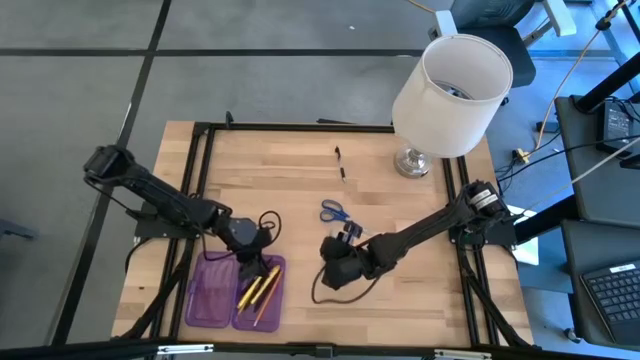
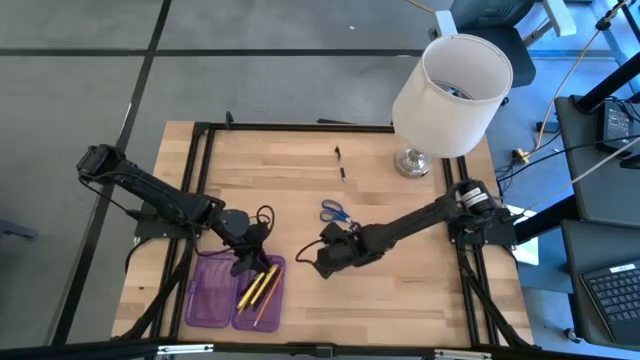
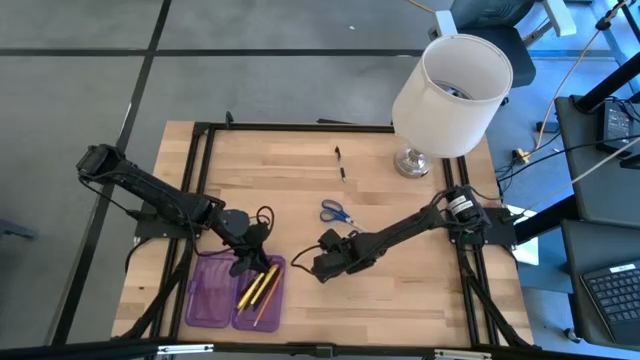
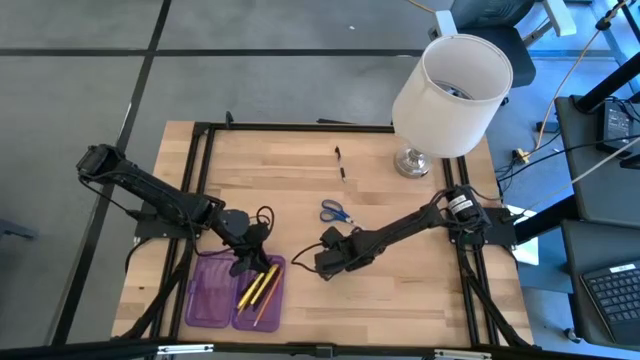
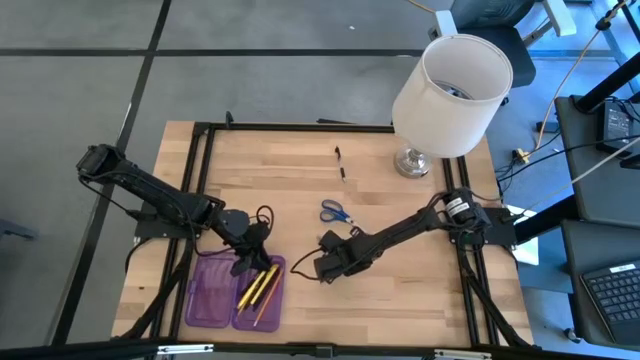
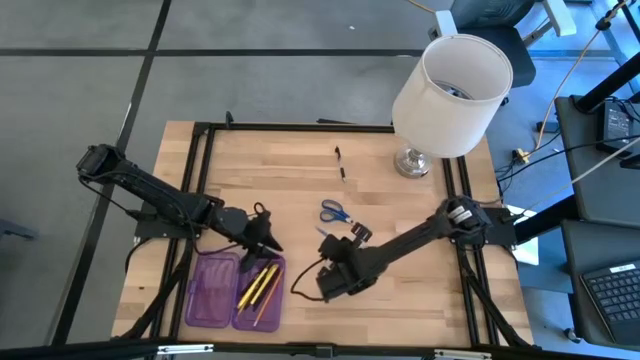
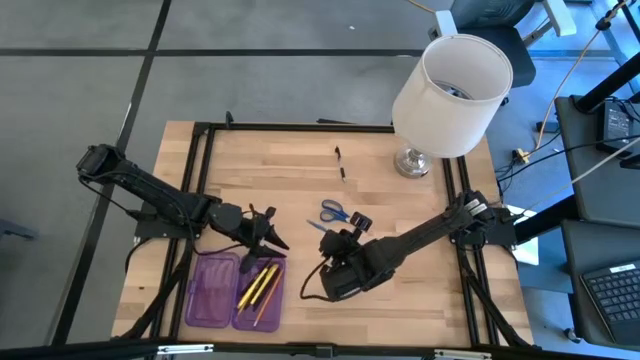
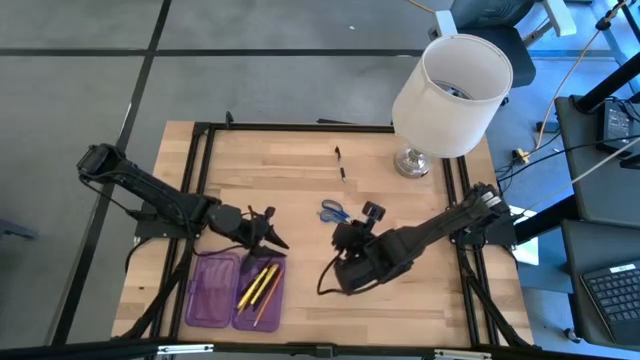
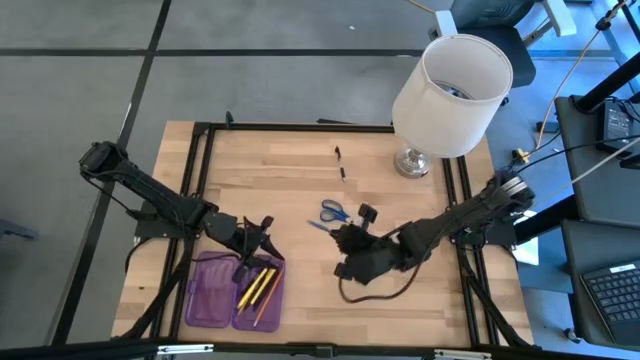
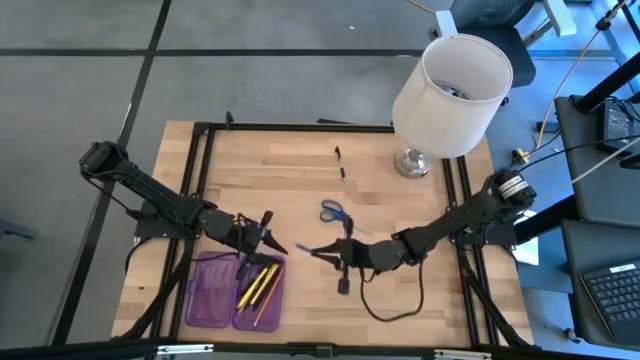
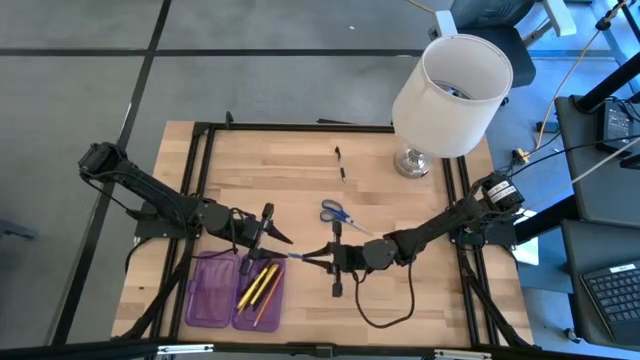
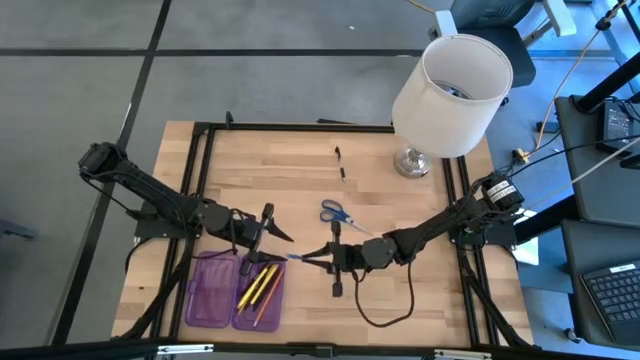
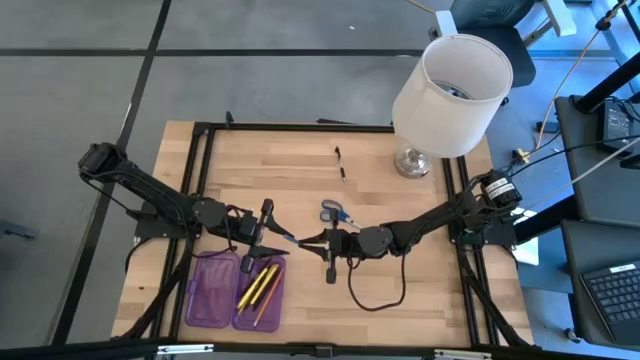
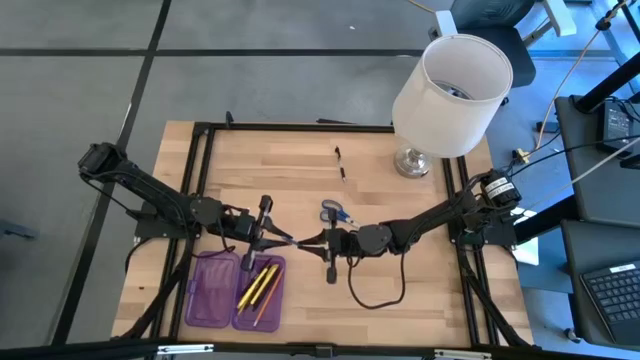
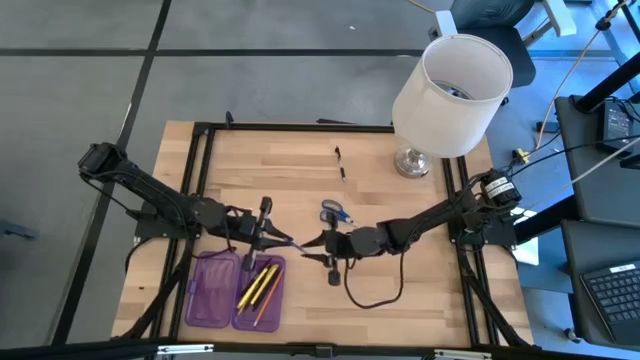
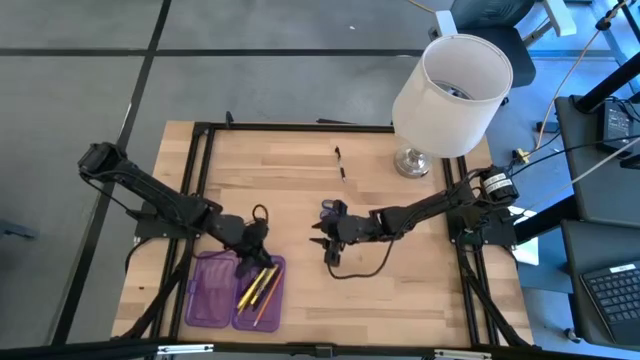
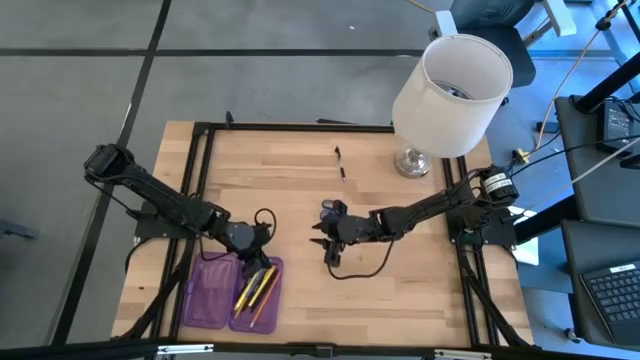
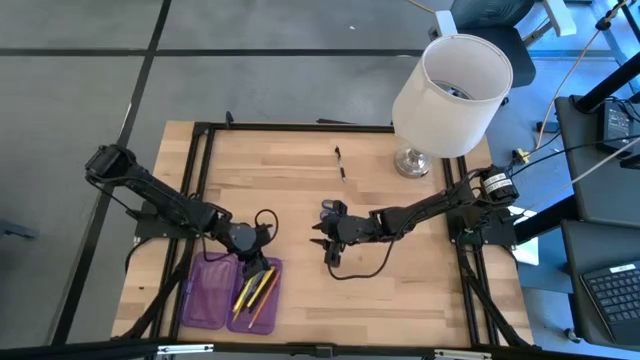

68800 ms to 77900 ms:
Task: Pick & place school supplies into a supply box
Put the blue pen into the violet box

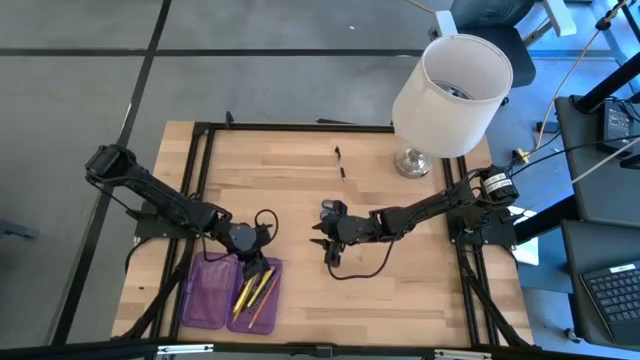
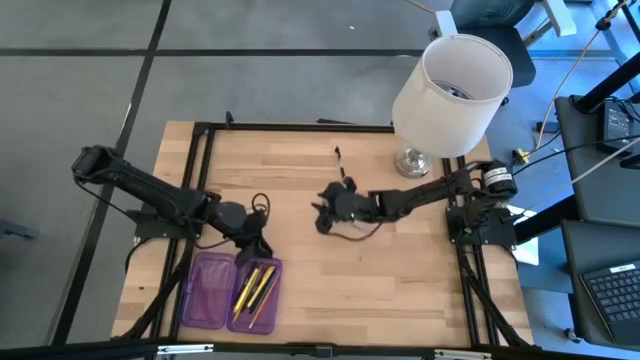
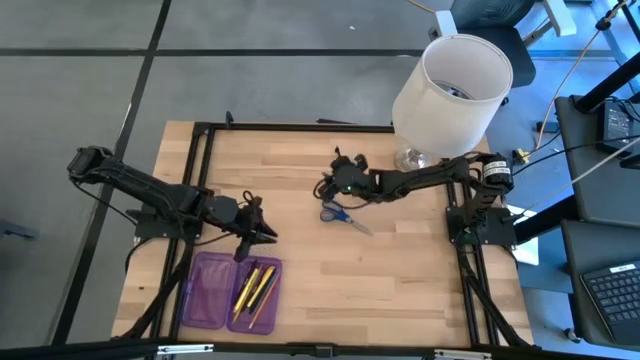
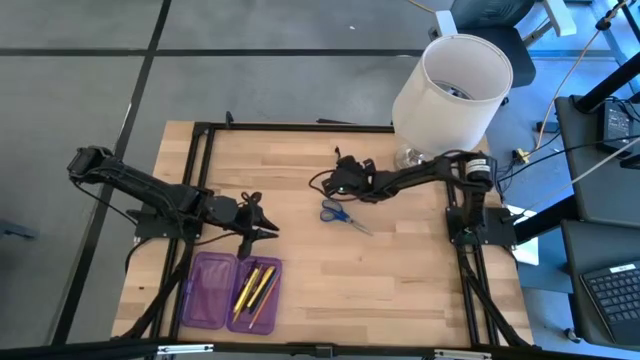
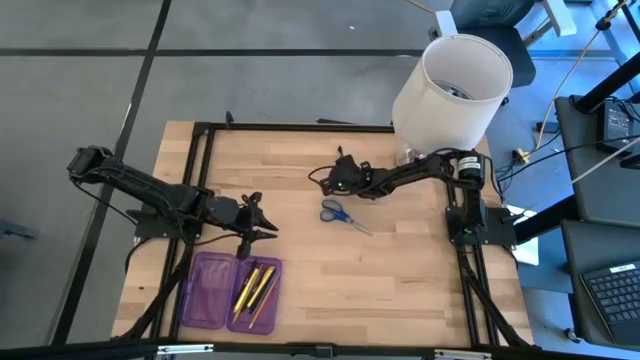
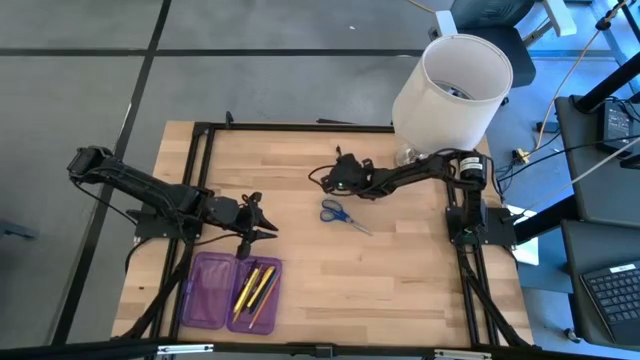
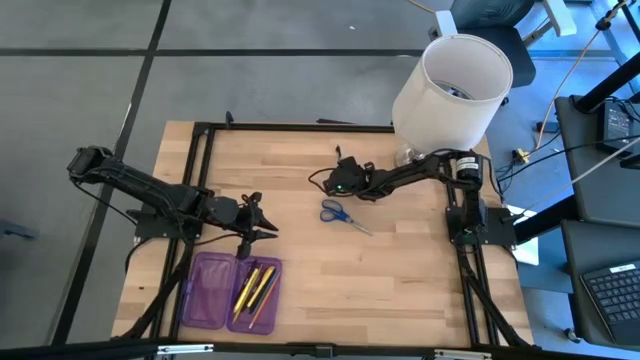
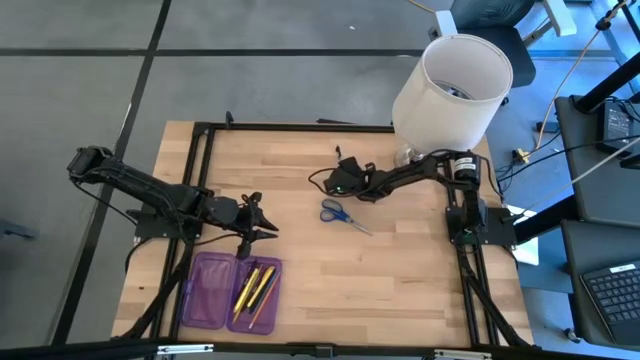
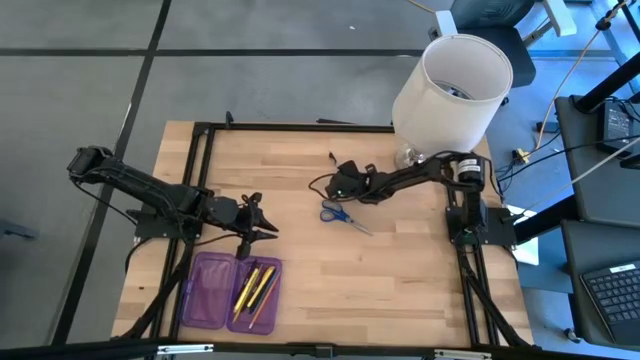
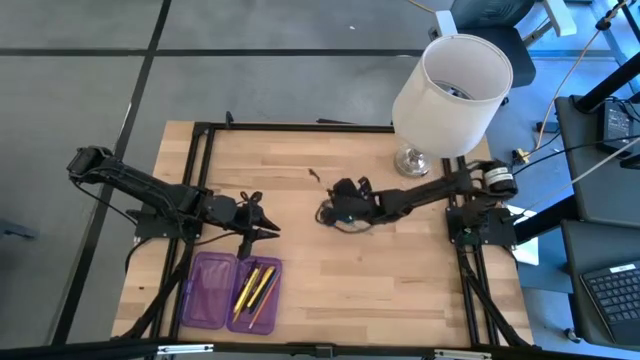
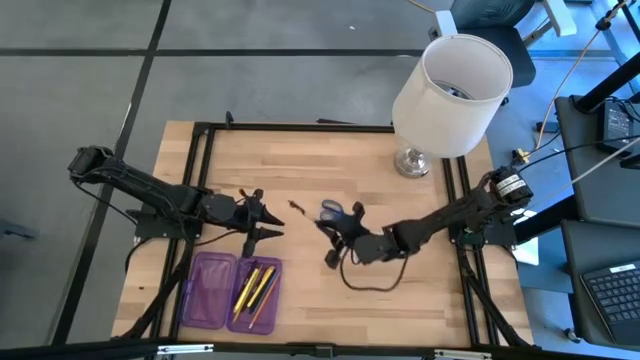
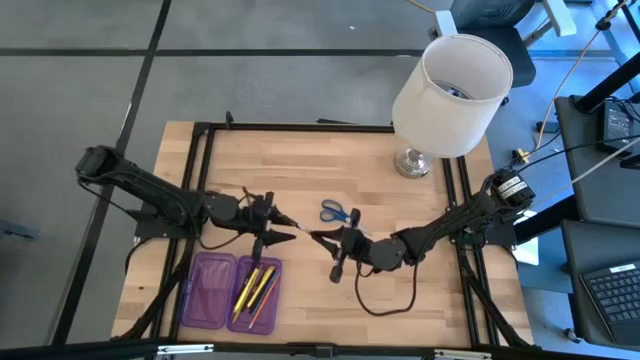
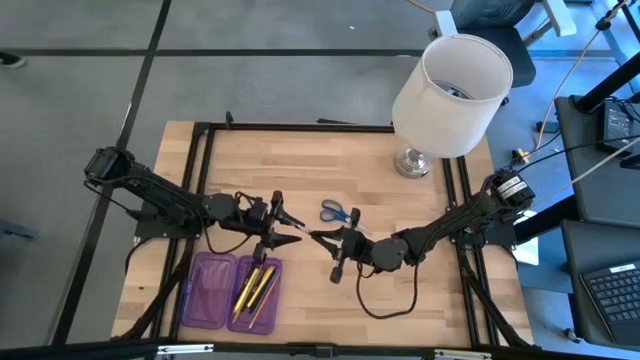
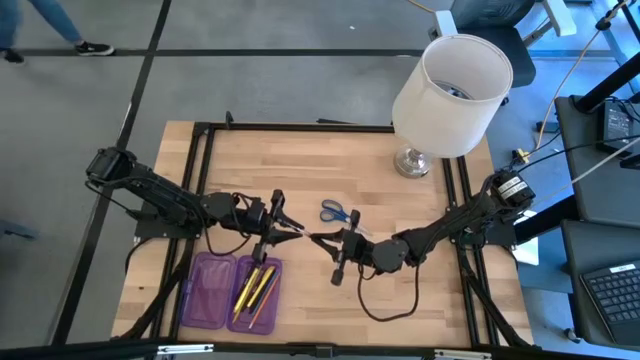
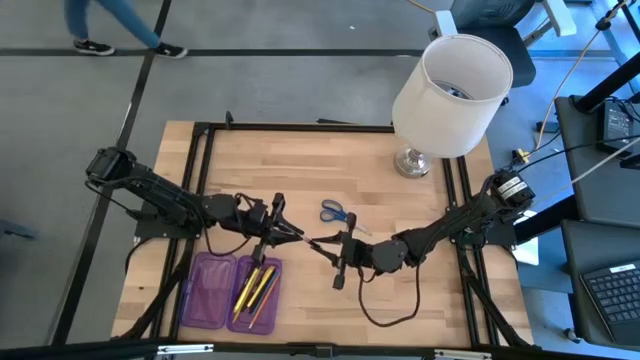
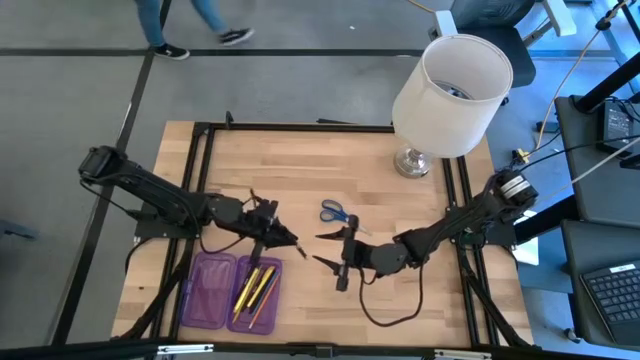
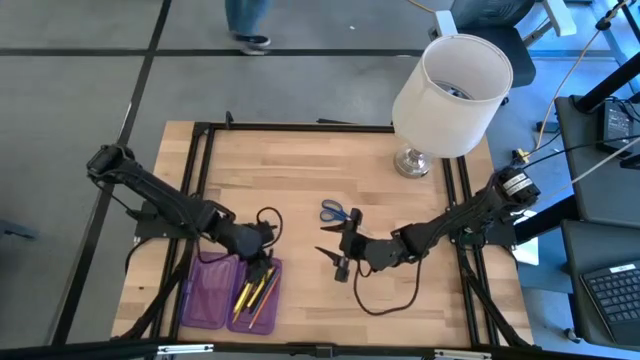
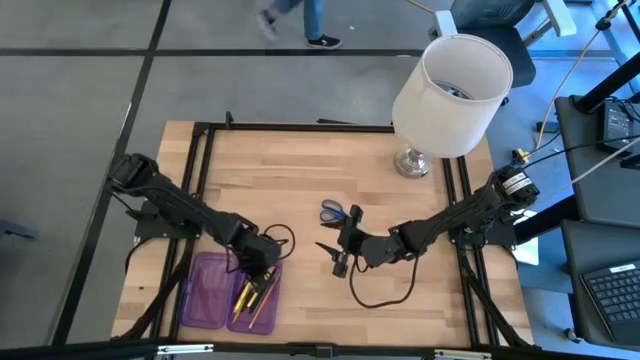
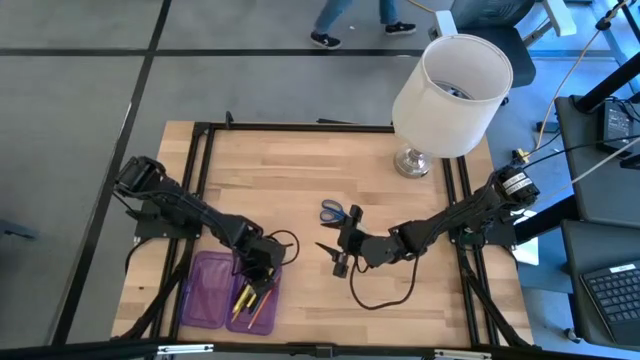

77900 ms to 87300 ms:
Put the transparent pen into the violet box

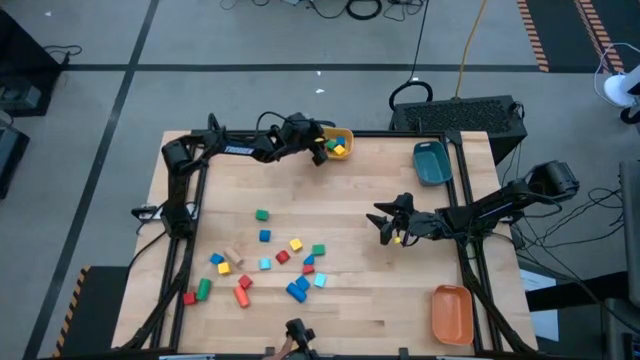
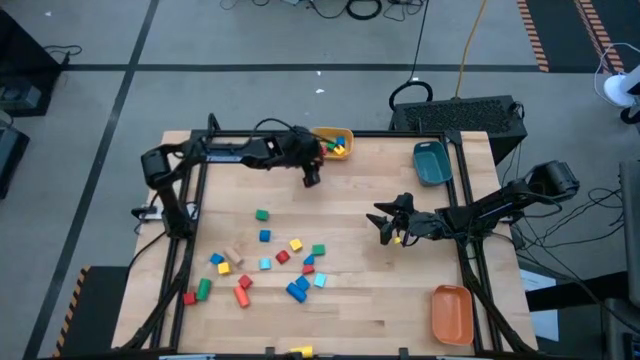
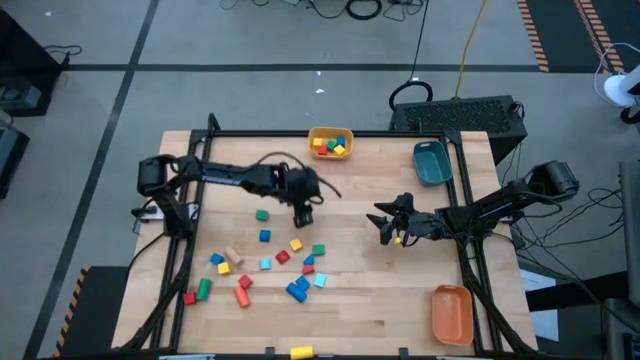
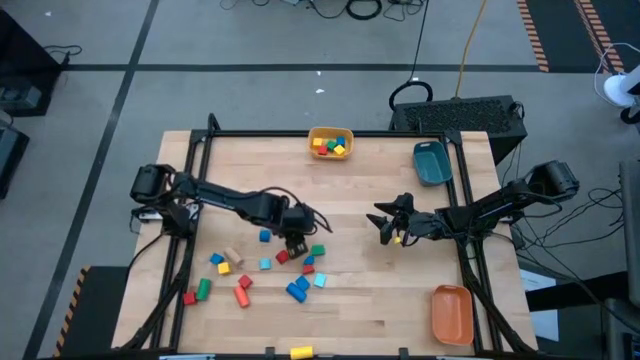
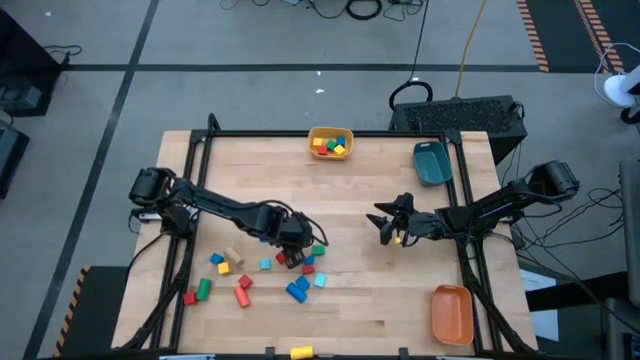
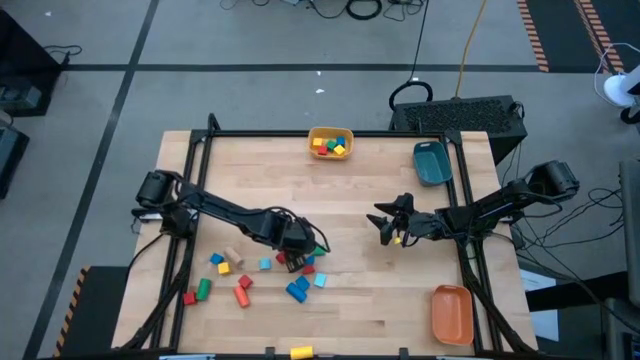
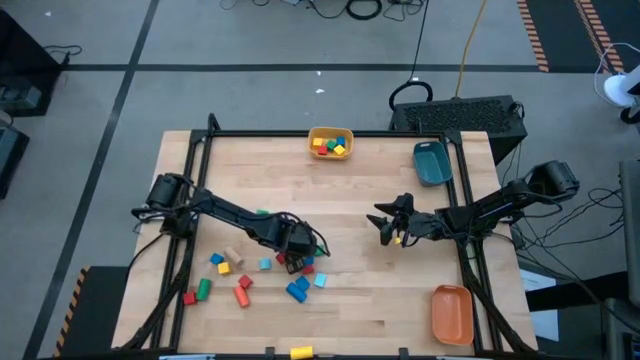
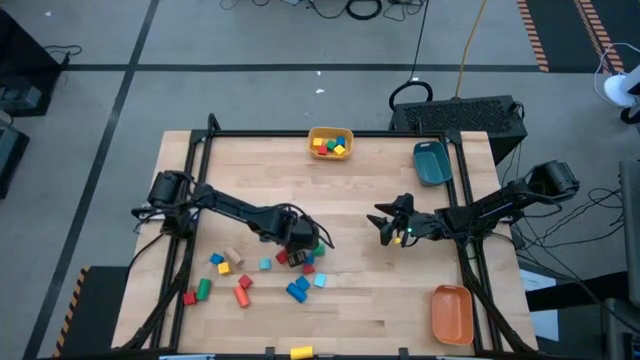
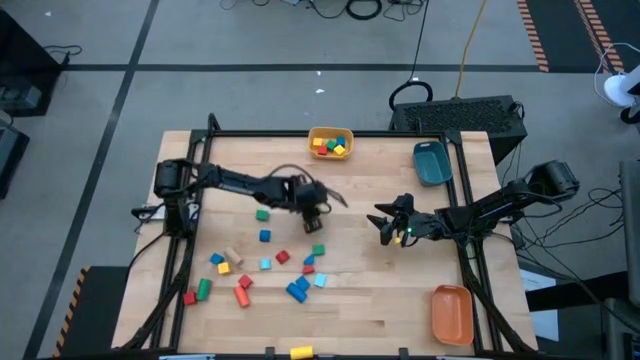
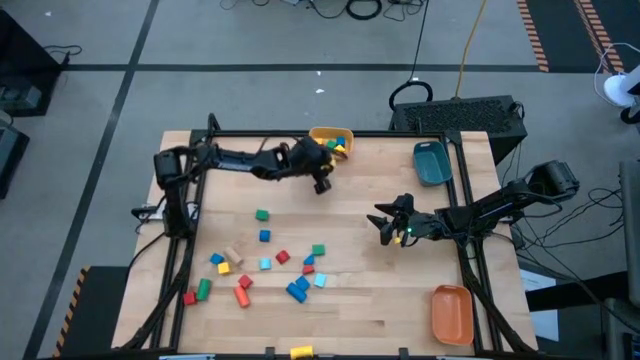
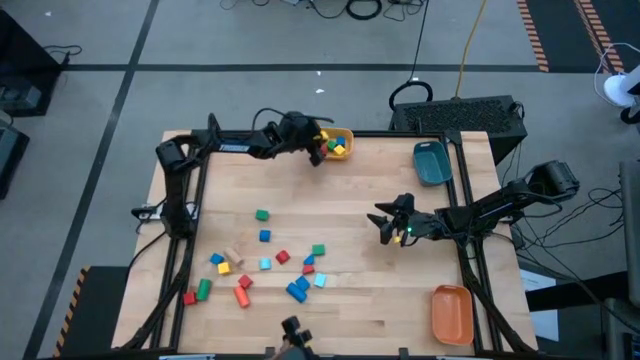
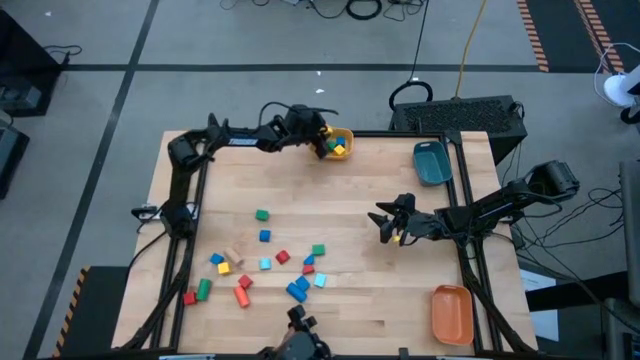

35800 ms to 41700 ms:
Task: Sort blocks by size
Put the yellow square block into the yellow bin
